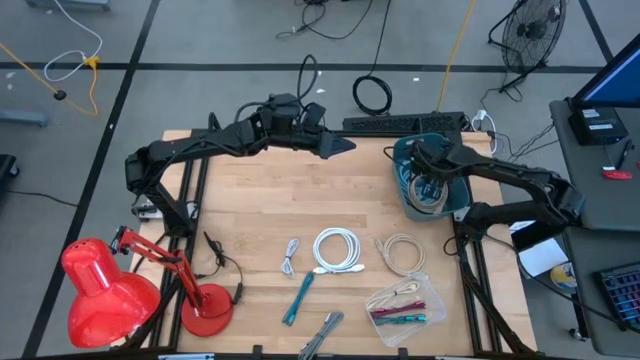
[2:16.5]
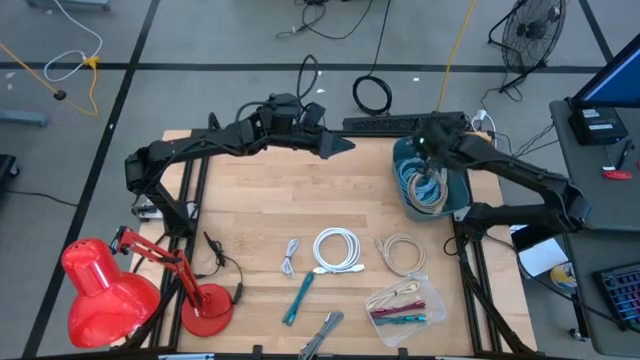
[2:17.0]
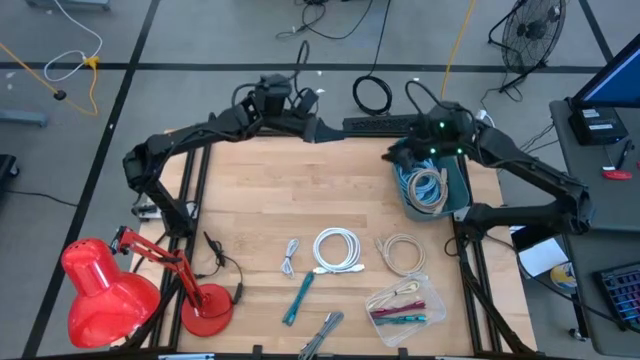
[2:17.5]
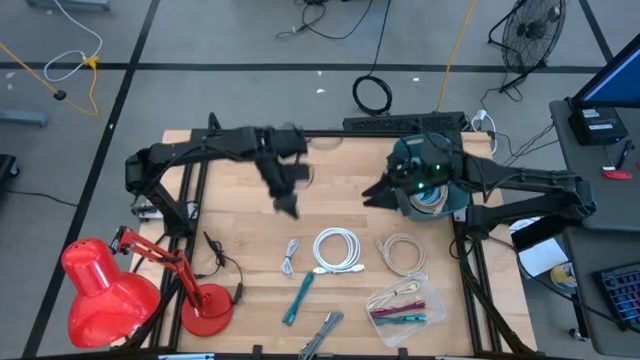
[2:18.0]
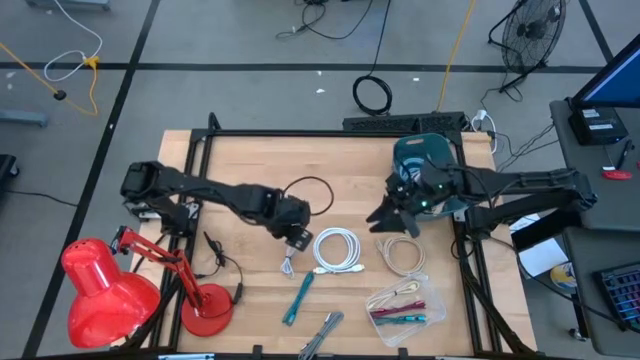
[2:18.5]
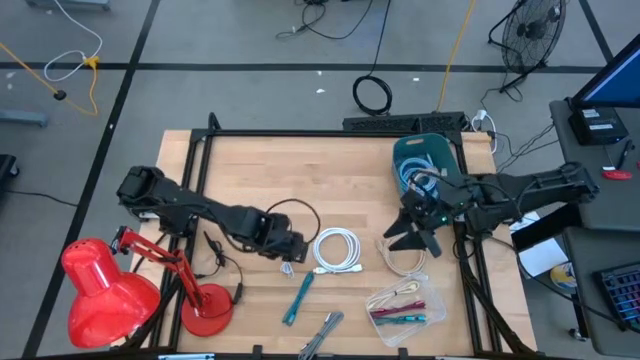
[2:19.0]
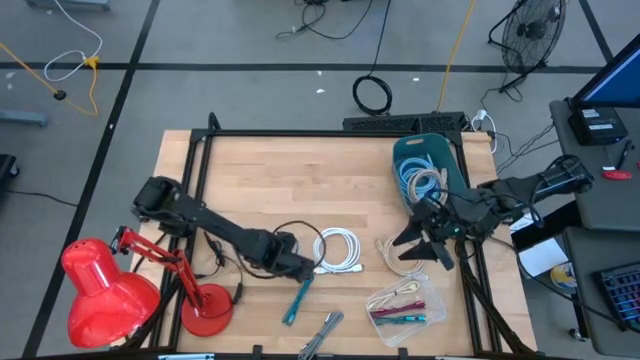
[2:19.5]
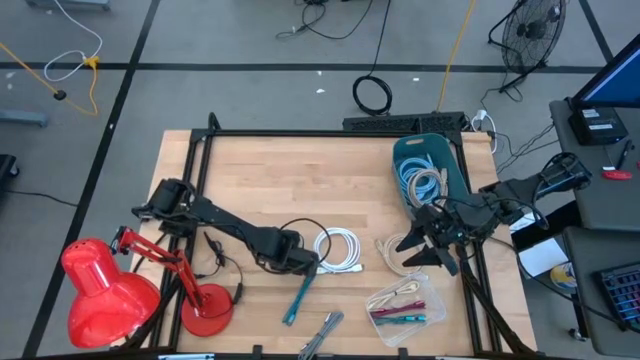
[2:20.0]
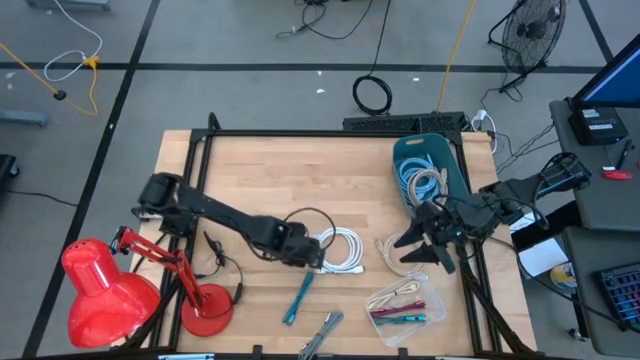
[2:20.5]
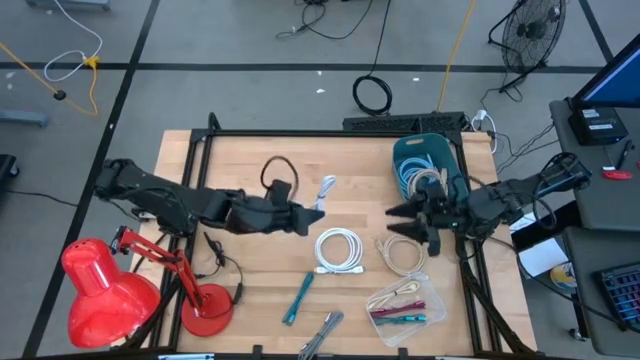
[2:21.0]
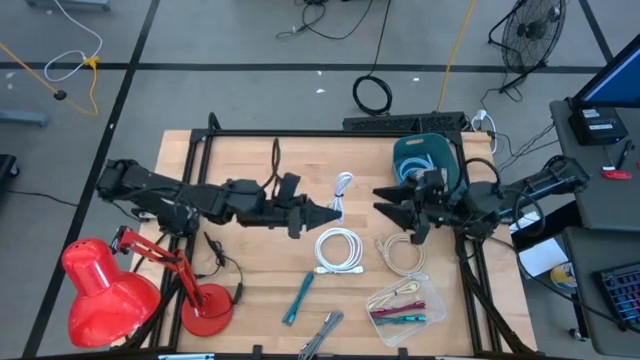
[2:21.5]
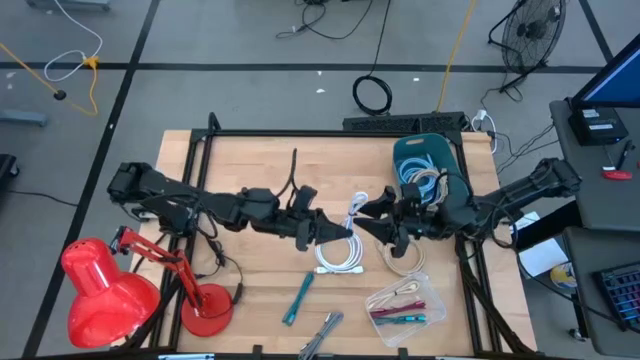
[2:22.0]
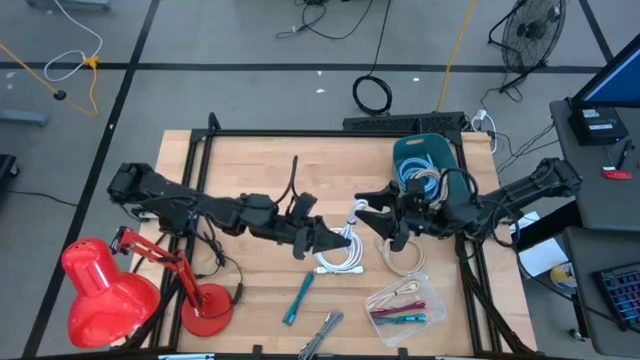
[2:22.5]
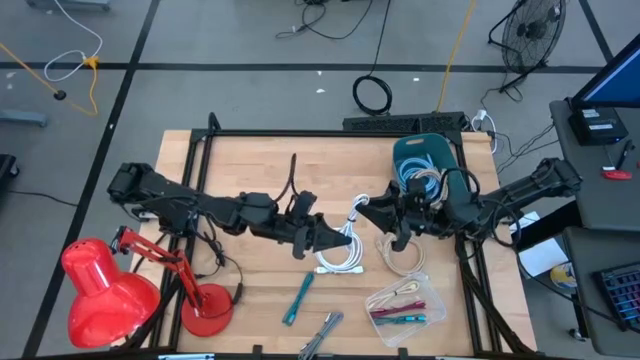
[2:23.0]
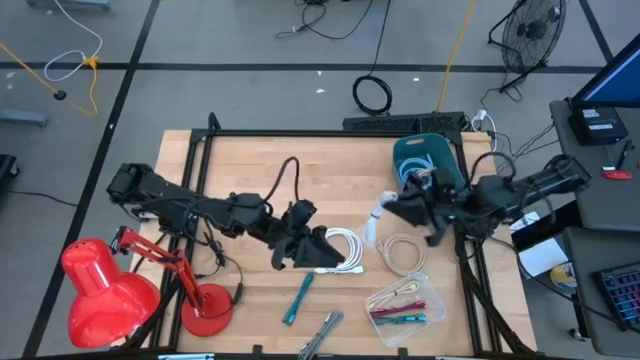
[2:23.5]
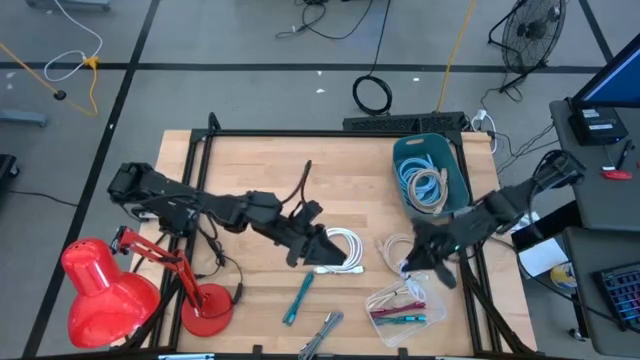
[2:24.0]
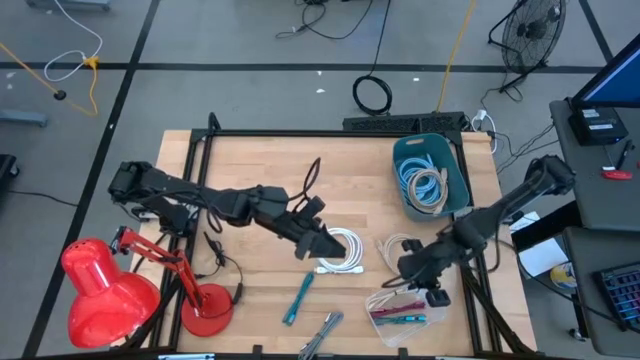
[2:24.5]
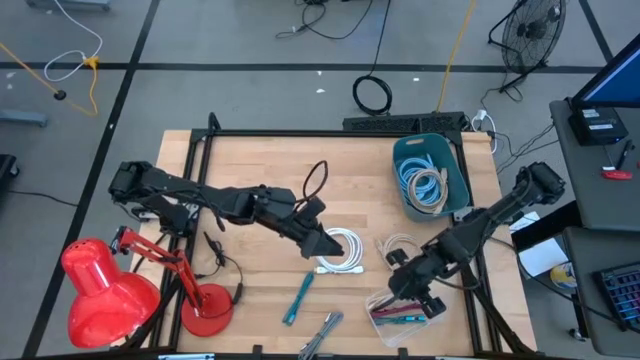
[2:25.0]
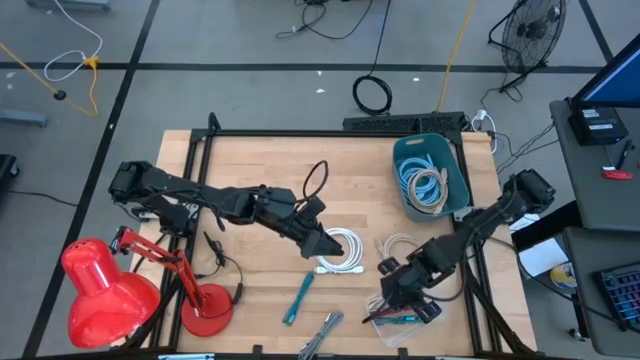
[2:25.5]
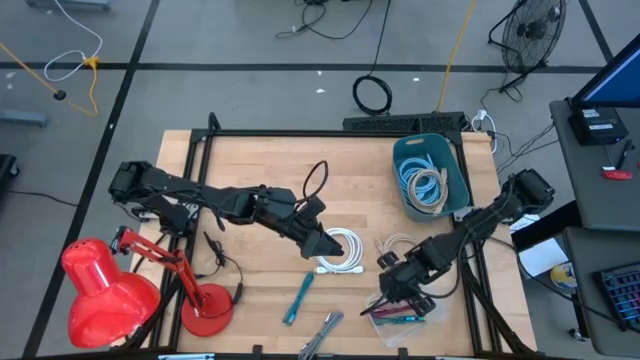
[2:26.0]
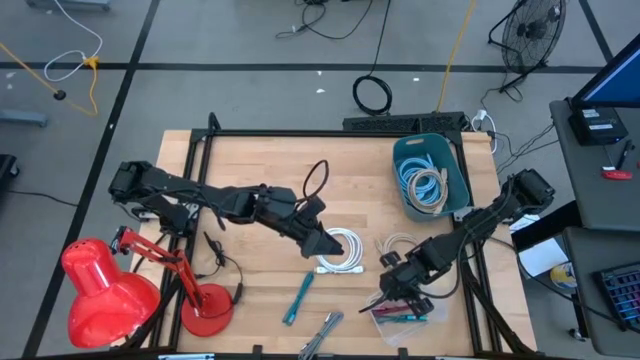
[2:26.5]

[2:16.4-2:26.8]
Task: Pick & Place USB Port
Put the white charger cable into the transparent bin

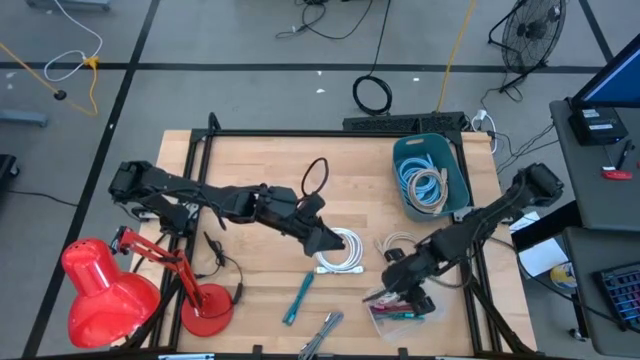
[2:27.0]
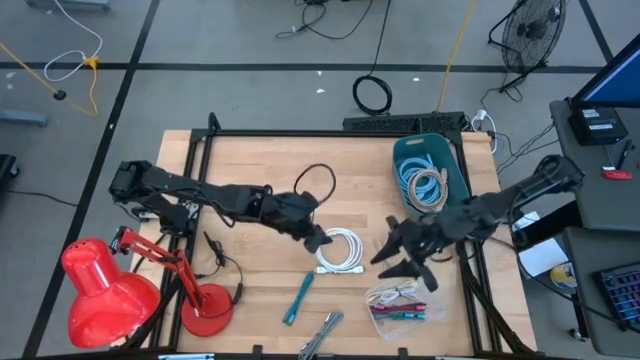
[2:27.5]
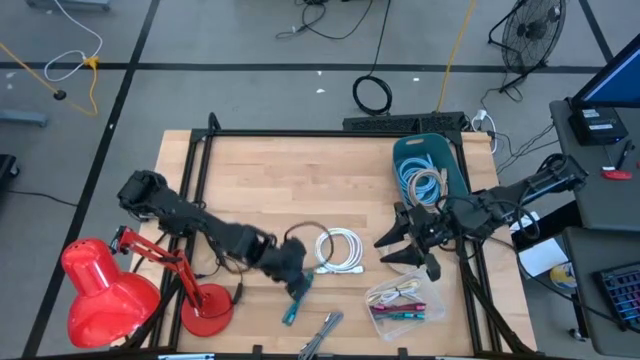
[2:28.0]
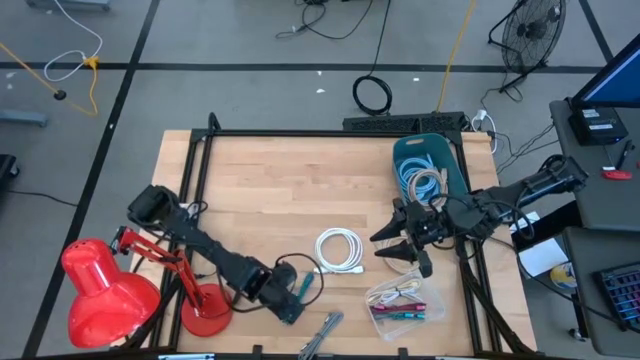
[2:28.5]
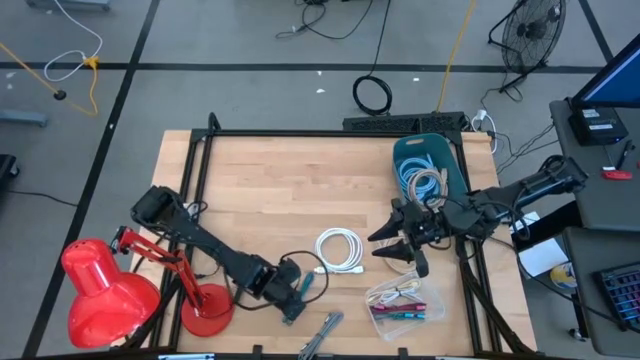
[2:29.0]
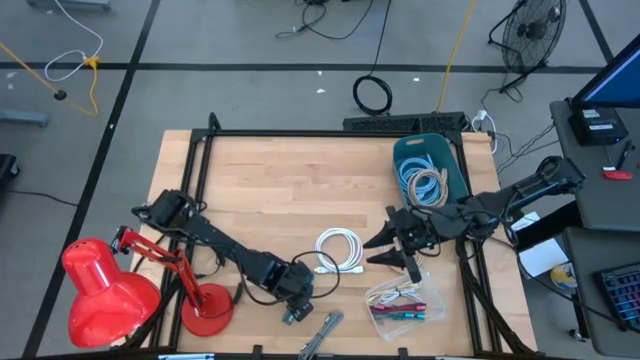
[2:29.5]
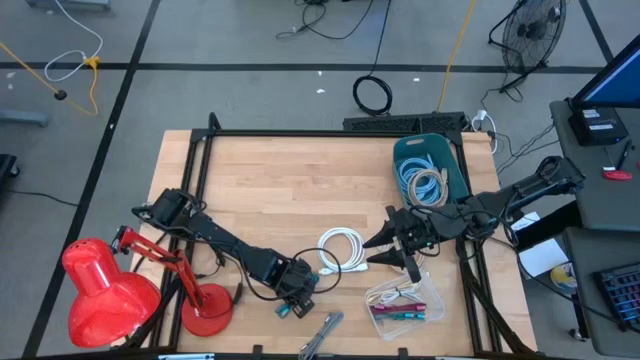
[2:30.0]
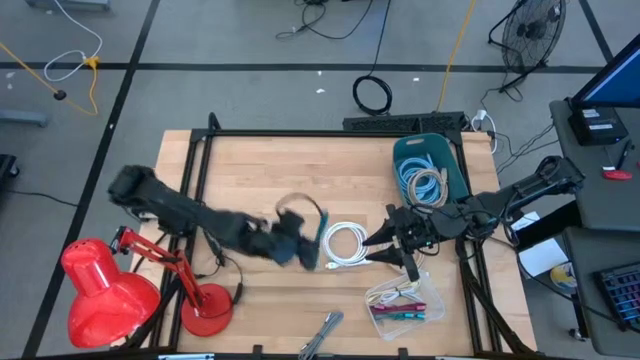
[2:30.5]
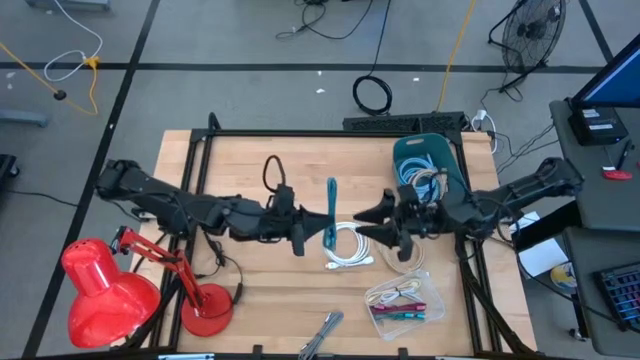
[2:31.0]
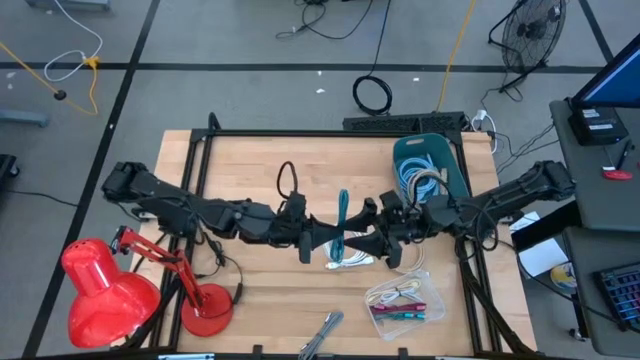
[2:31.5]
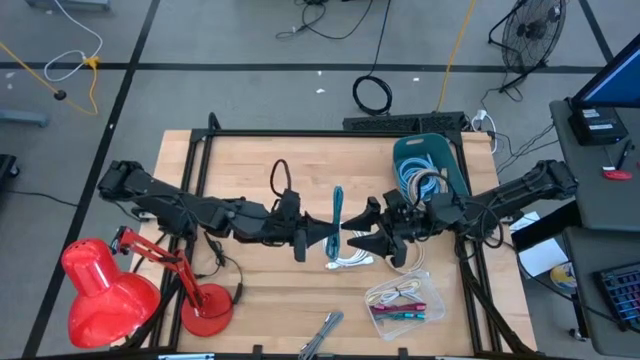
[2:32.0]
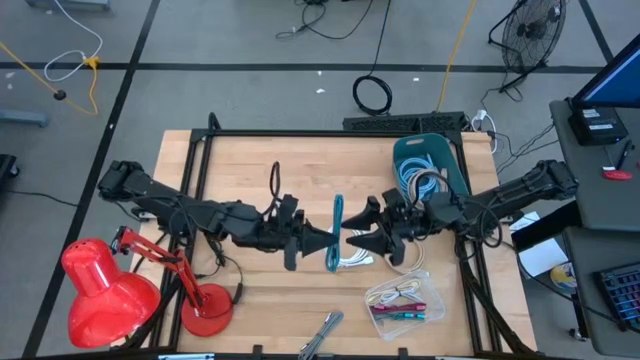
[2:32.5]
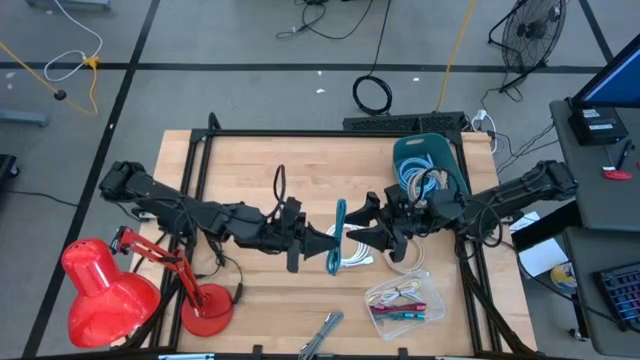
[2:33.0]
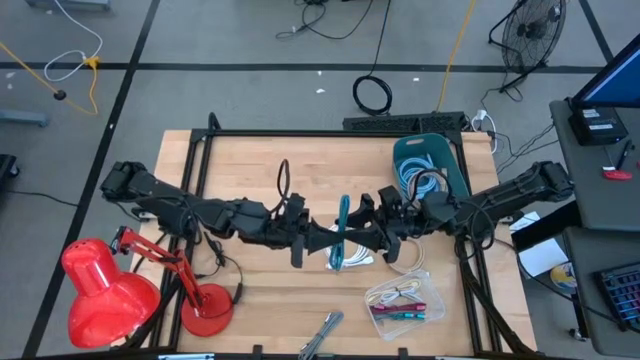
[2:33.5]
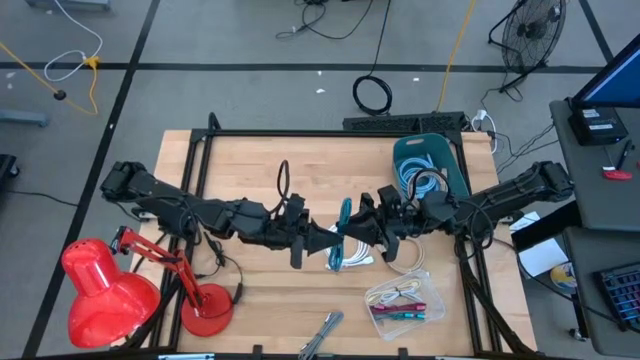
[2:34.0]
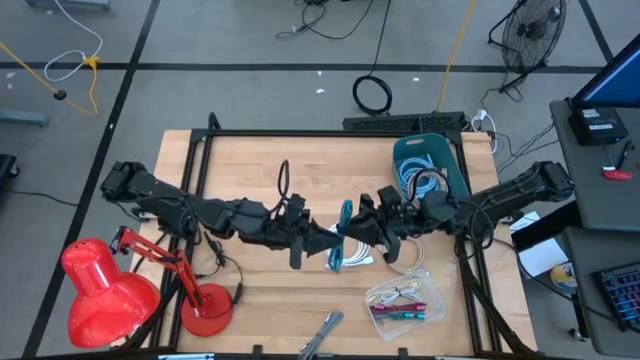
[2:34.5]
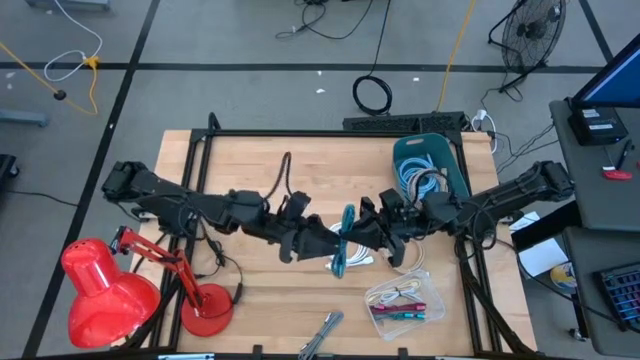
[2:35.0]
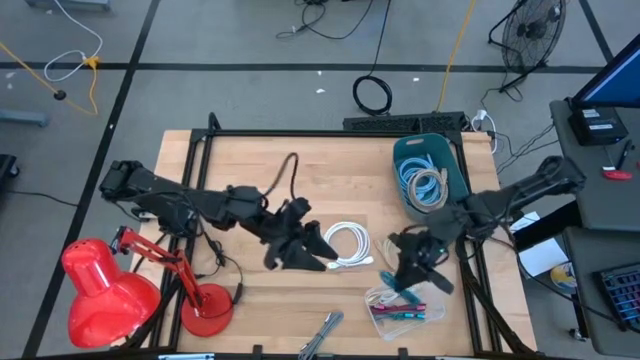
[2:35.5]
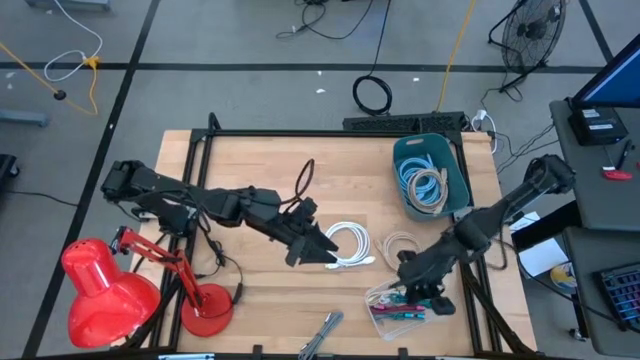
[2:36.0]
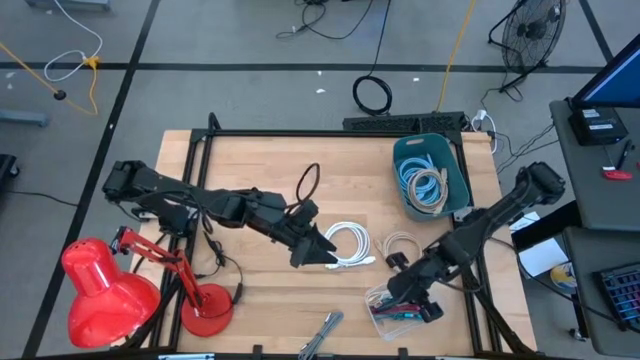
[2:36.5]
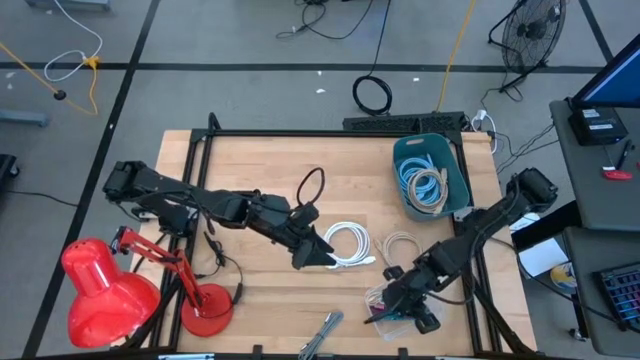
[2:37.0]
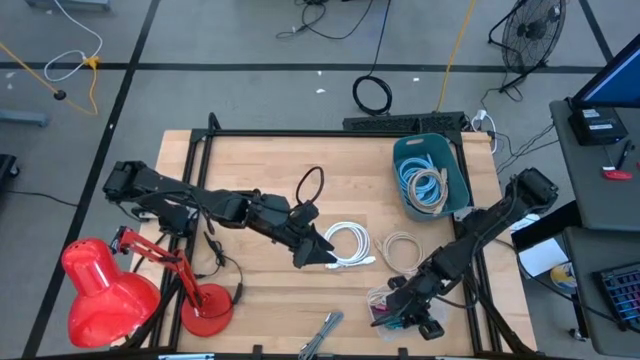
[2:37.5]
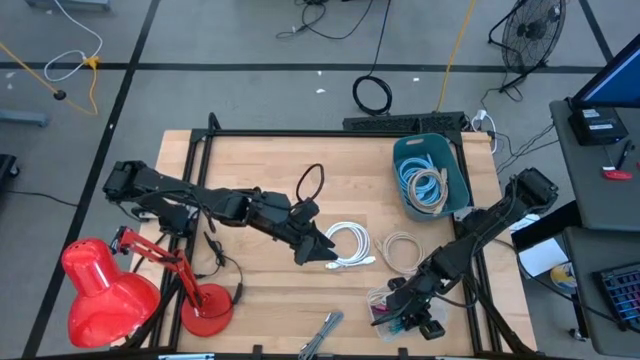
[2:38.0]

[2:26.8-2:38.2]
Put the blue charger cable into the transparent bin
